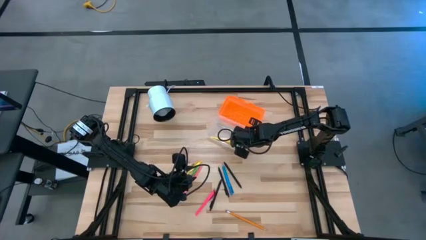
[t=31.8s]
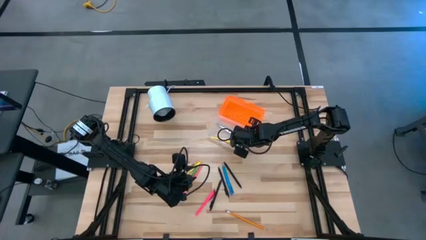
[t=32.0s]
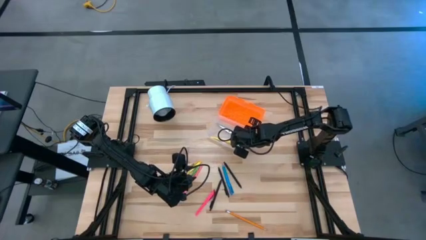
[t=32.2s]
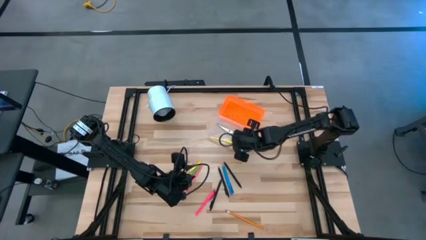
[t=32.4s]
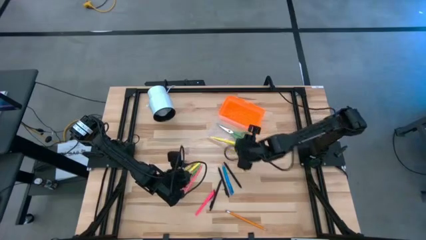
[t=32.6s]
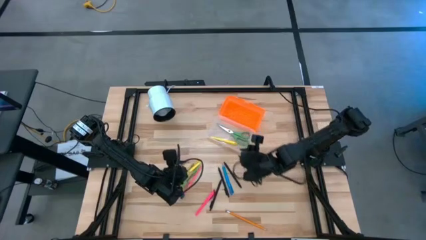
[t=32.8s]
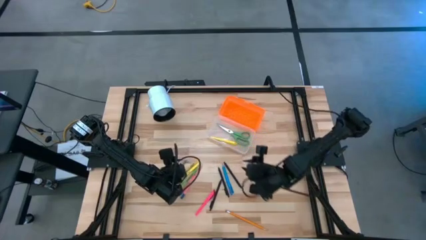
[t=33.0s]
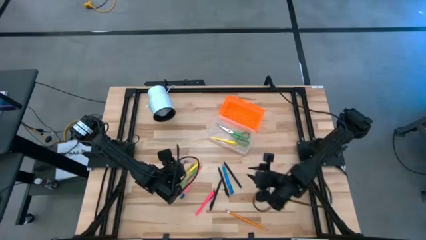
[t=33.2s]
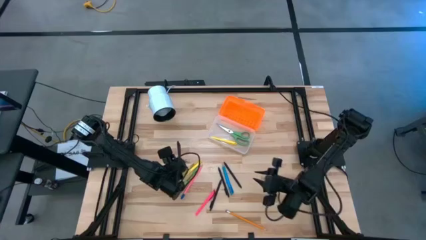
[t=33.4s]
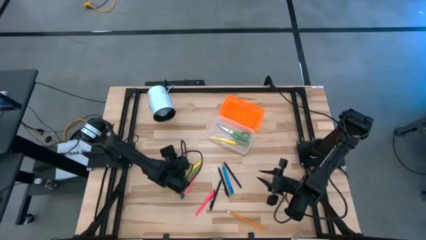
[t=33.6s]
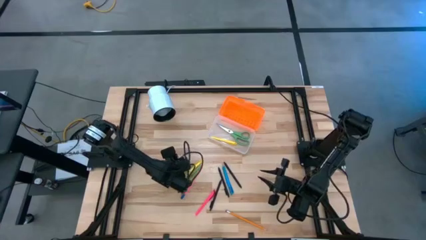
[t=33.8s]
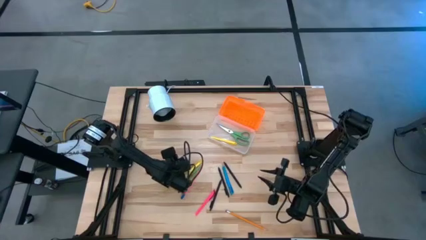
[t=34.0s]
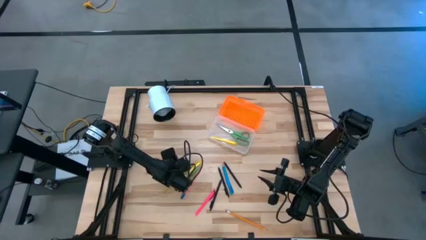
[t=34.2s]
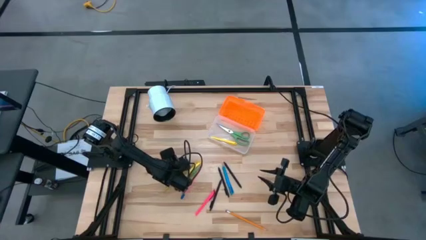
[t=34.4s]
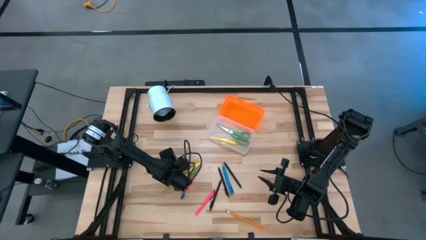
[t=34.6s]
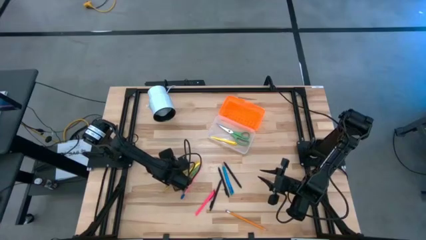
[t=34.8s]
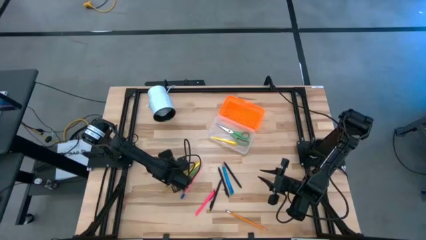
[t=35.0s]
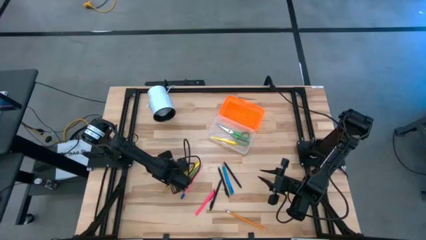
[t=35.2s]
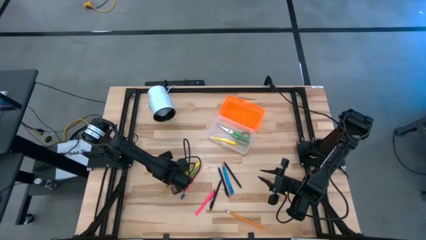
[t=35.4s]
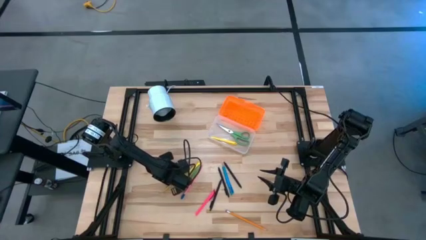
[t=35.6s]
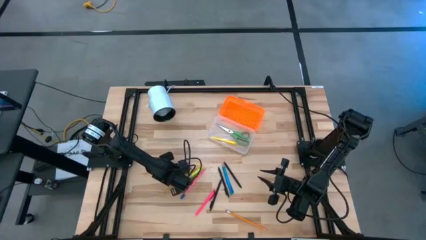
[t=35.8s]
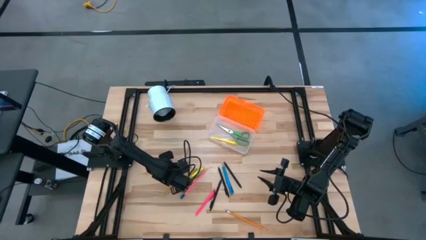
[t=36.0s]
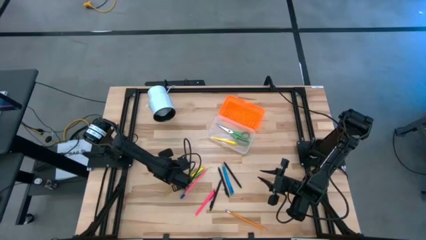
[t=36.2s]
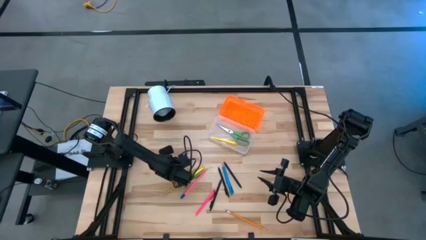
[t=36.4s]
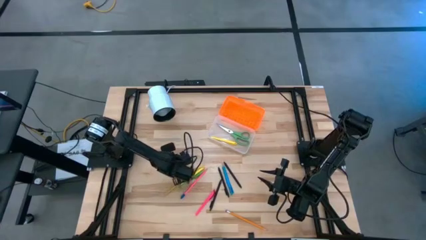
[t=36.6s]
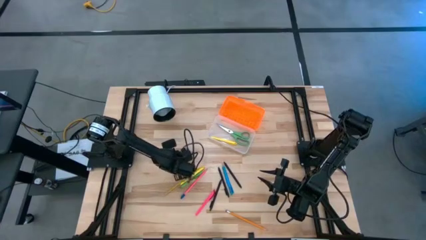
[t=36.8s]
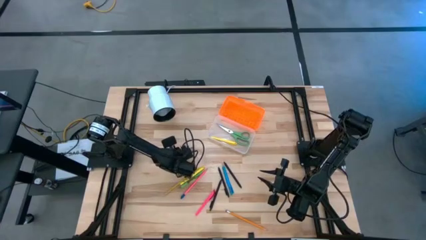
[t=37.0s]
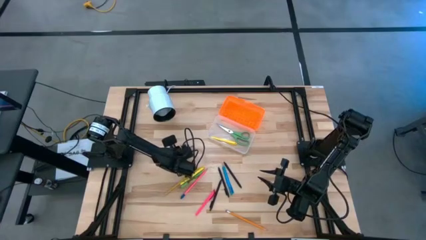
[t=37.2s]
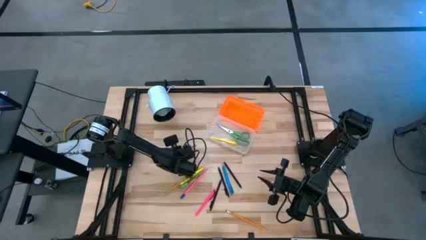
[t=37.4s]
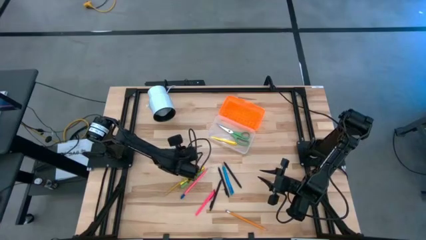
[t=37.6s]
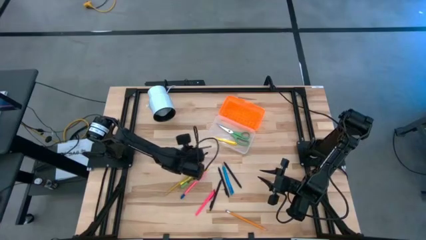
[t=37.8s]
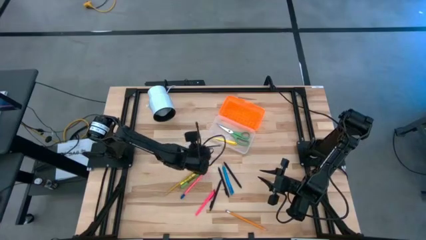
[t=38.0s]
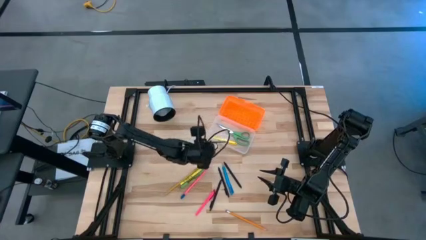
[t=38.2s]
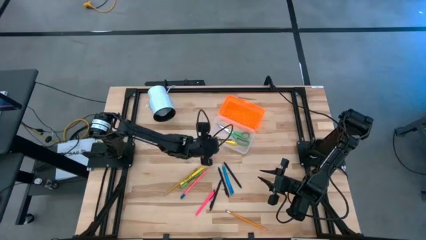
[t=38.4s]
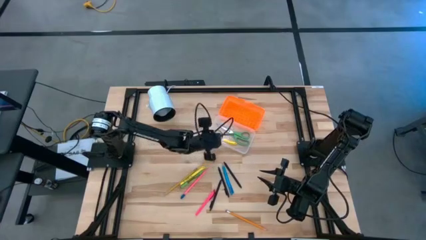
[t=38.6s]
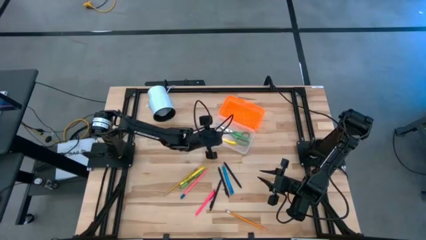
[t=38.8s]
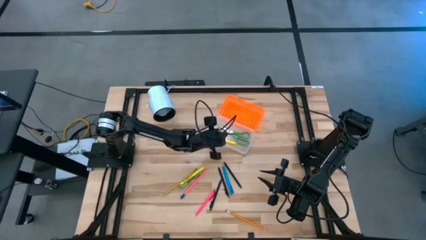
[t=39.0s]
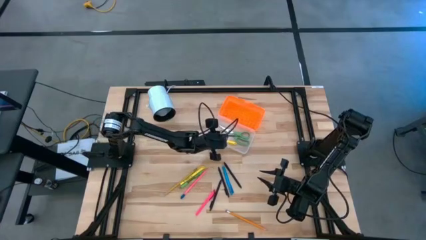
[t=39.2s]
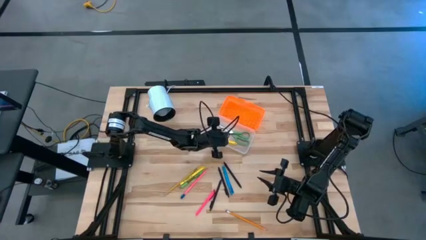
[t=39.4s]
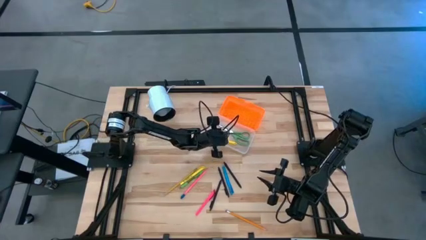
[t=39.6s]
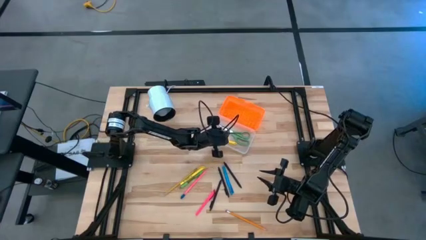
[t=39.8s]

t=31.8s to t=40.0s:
Task: Pick & place school supplies into a supply box
Put the grey pen into the supply box

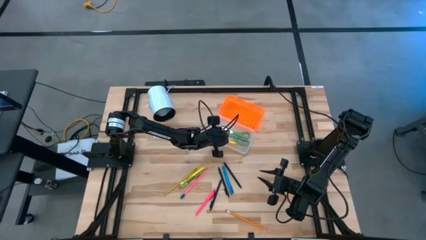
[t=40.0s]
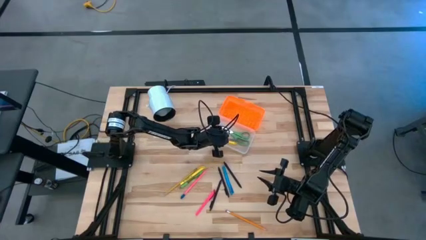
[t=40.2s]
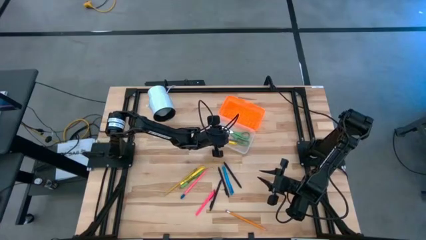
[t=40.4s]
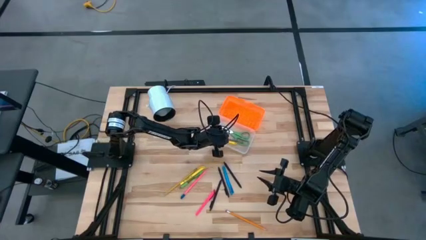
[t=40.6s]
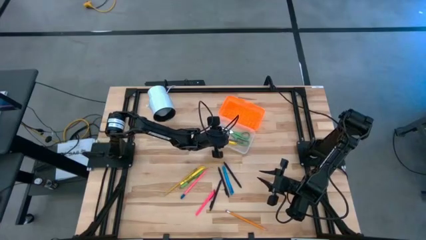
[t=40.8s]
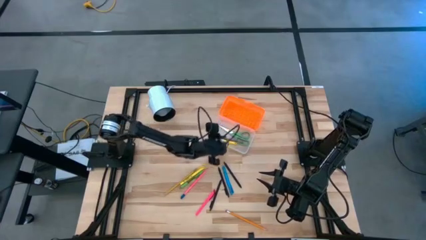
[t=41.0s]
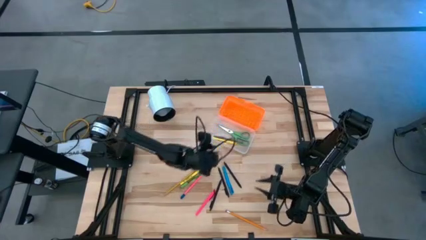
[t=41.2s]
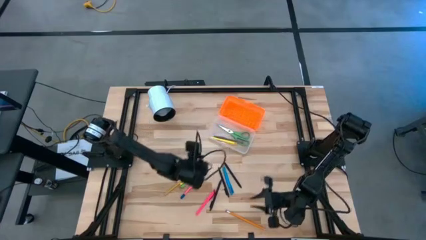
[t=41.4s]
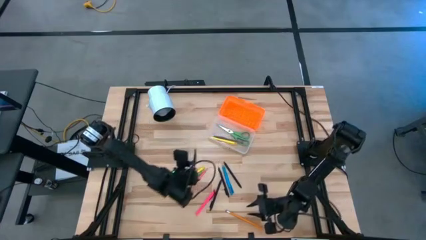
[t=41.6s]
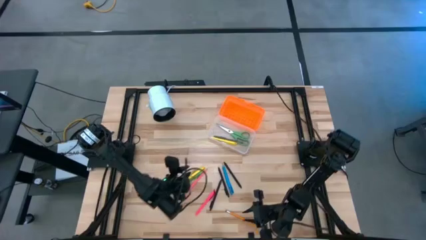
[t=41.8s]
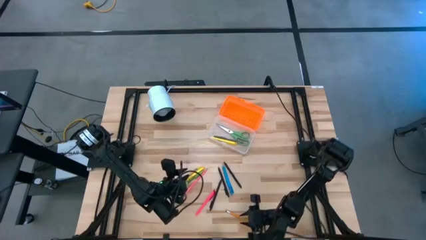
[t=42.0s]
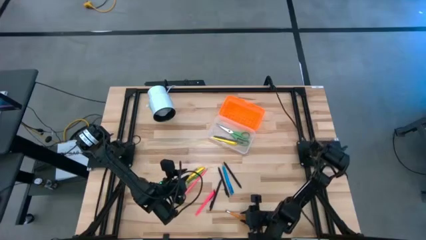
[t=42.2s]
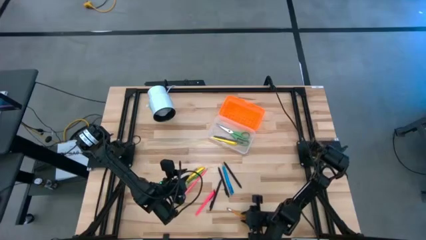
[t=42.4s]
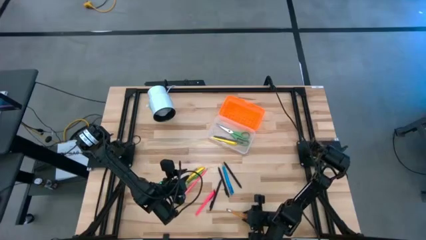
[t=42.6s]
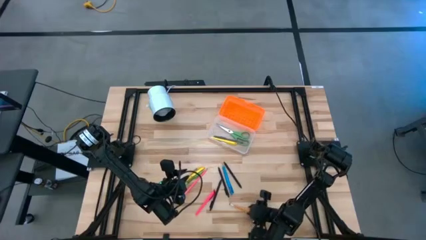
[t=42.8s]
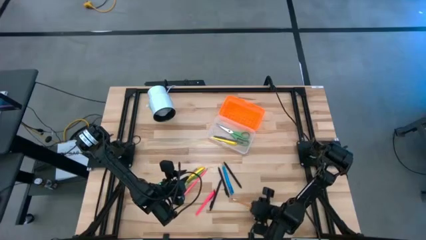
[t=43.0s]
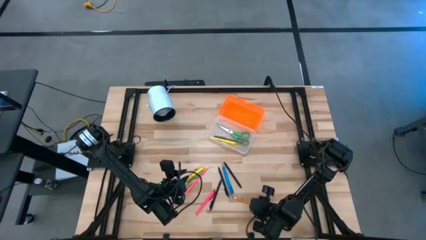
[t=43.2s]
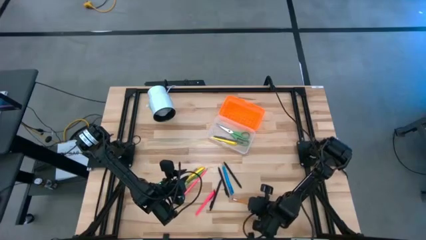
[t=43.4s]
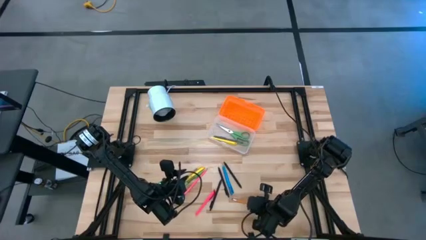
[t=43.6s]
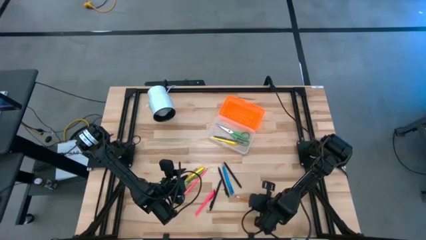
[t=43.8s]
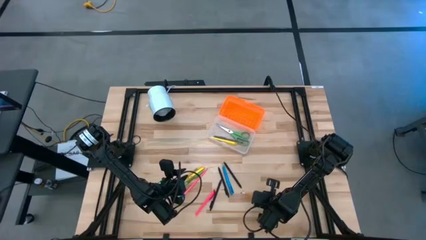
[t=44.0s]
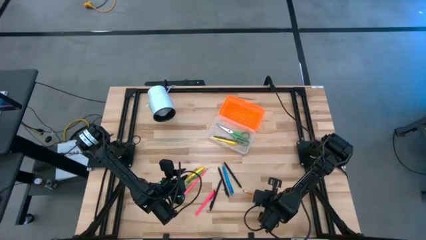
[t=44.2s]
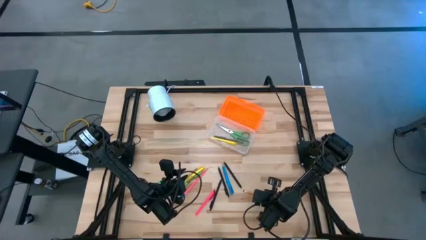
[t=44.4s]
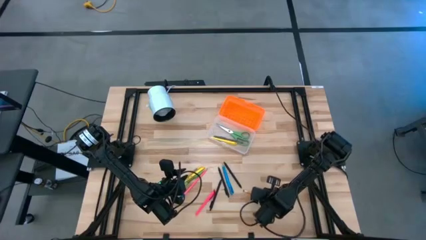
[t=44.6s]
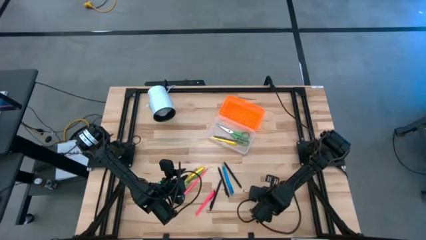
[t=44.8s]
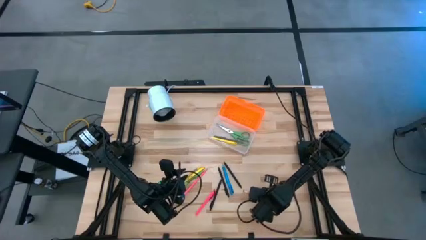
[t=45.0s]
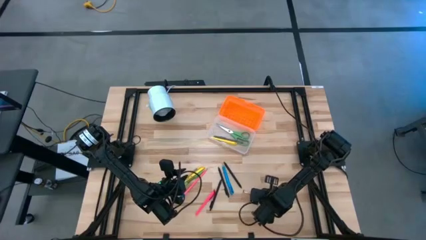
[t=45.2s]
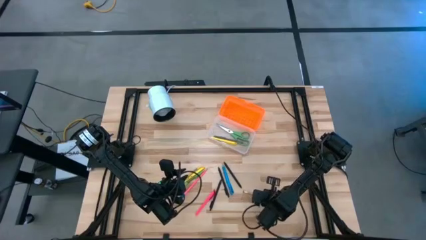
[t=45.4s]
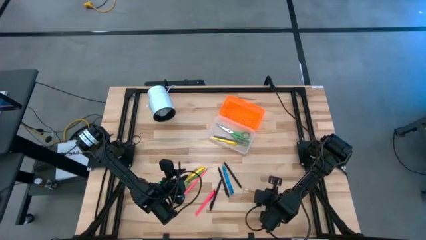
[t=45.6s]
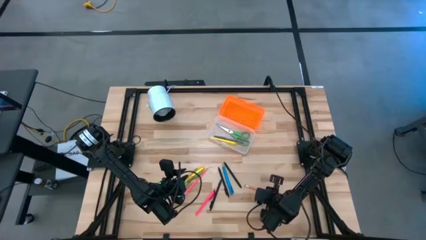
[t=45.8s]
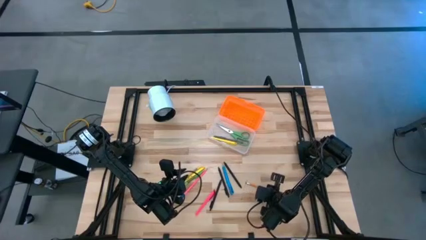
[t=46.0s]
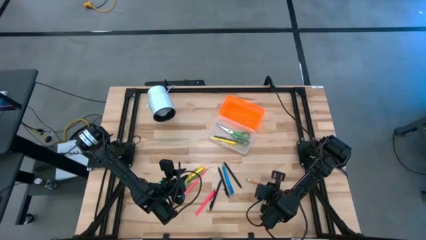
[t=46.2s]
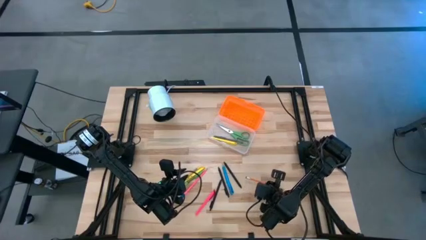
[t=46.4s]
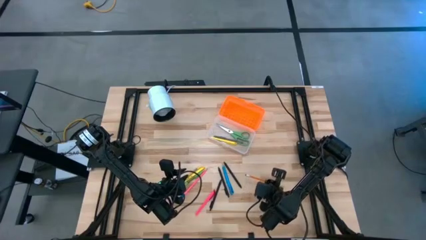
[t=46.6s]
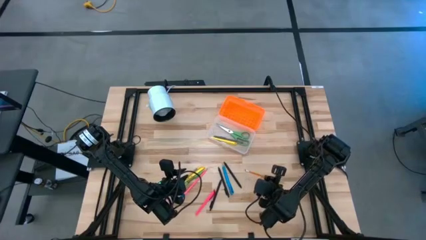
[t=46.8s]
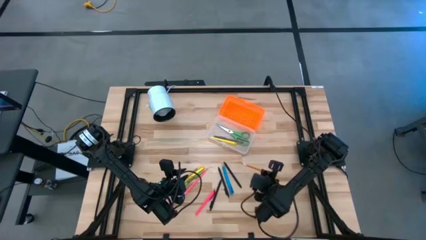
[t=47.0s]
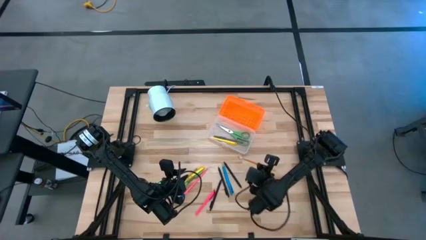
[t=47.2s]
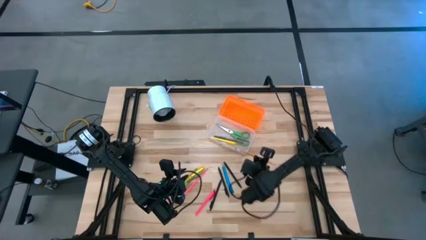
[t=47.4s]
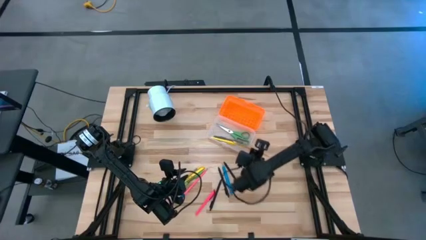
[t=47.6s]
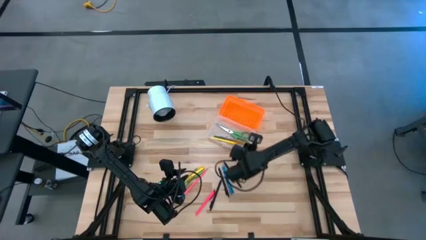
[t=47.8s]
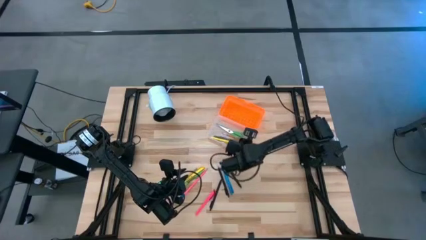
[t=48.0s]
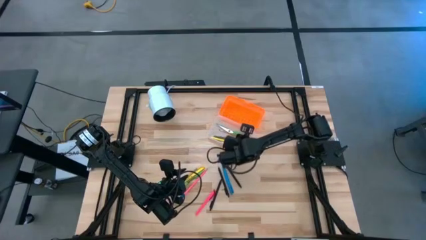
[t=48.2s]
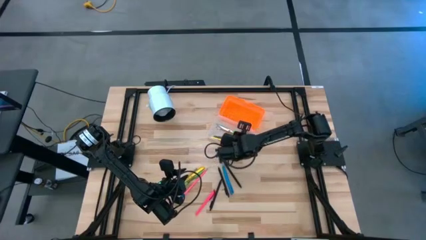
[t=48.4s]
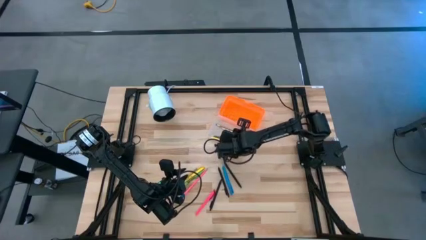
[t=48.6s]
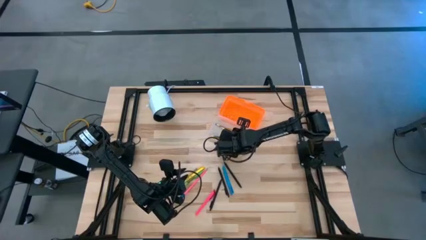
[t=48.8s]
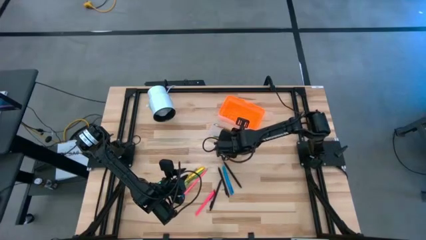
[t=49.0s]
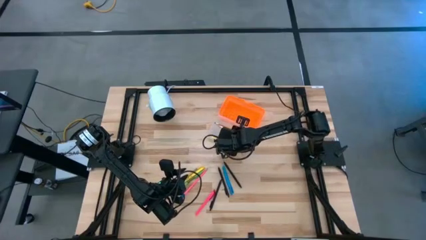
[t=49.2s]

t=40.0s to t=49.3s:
Put the orange pencil into the supply box
